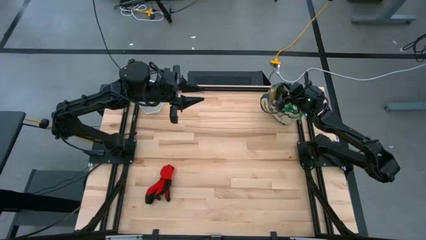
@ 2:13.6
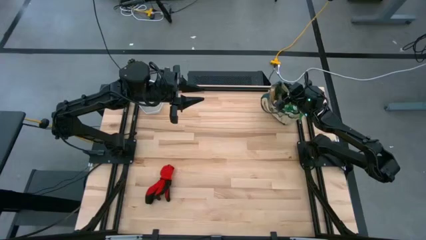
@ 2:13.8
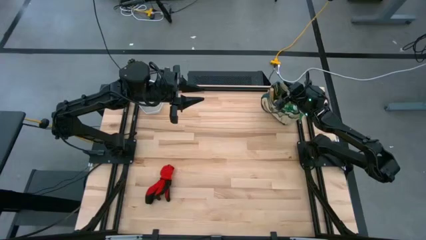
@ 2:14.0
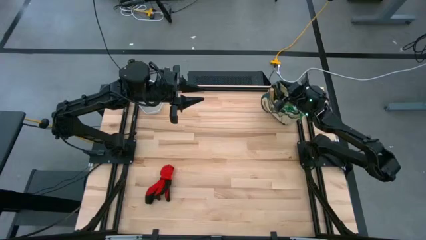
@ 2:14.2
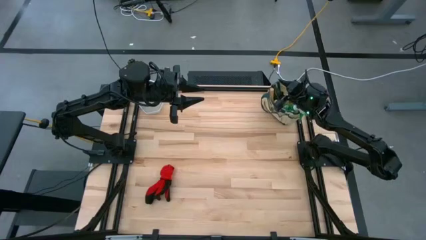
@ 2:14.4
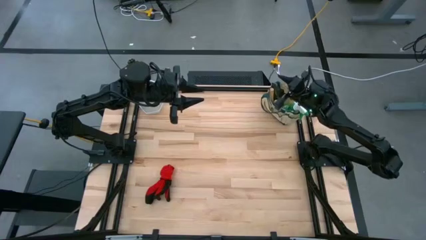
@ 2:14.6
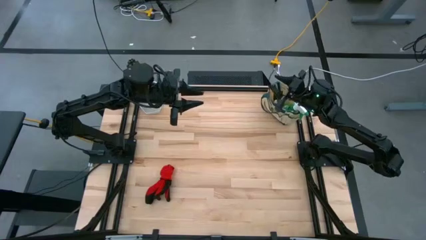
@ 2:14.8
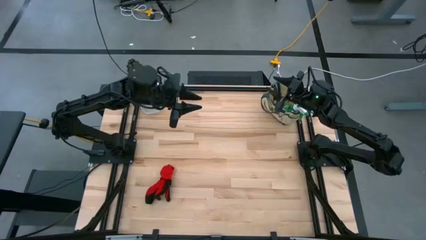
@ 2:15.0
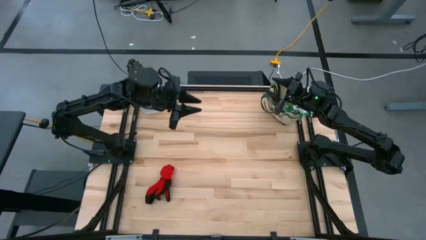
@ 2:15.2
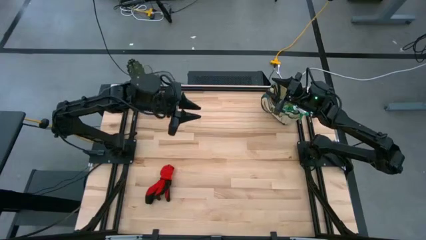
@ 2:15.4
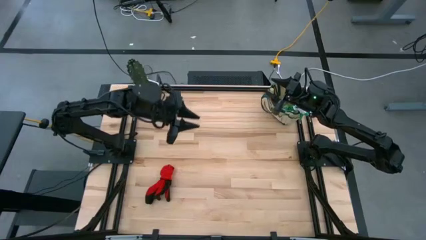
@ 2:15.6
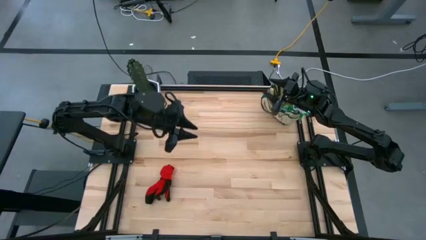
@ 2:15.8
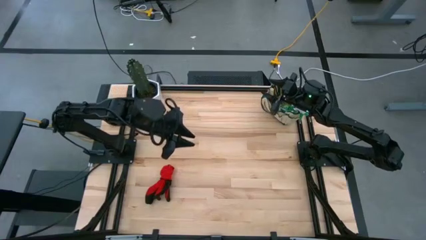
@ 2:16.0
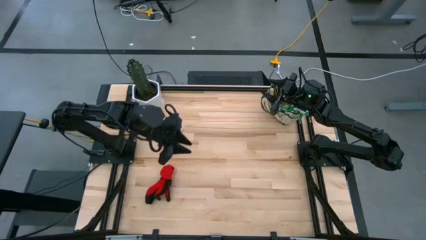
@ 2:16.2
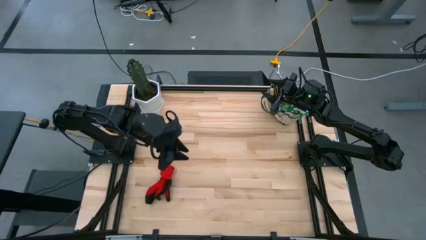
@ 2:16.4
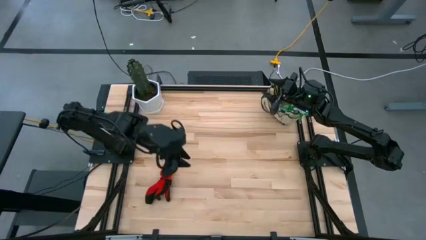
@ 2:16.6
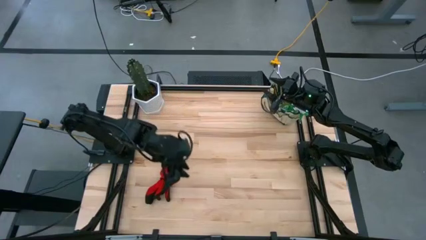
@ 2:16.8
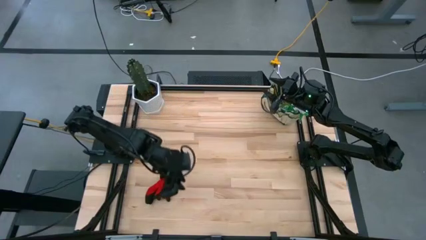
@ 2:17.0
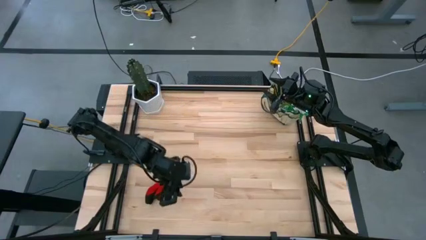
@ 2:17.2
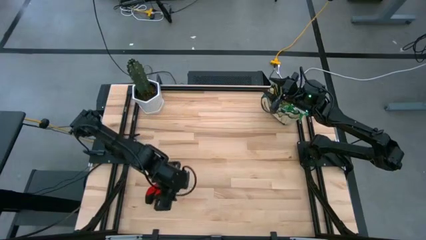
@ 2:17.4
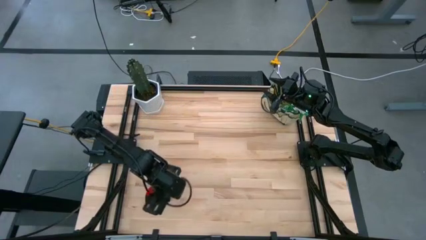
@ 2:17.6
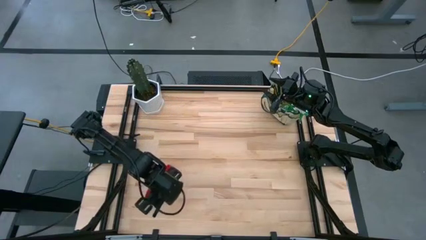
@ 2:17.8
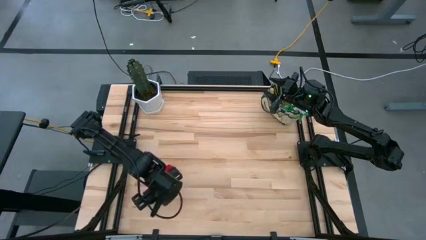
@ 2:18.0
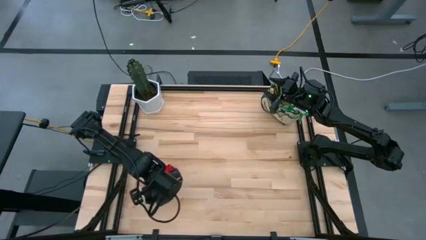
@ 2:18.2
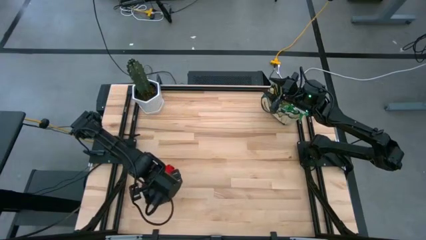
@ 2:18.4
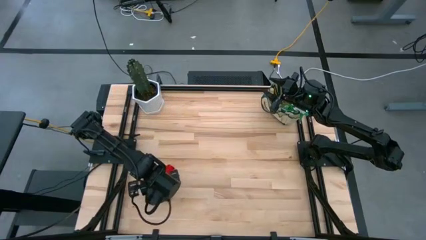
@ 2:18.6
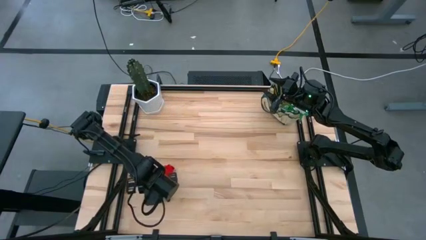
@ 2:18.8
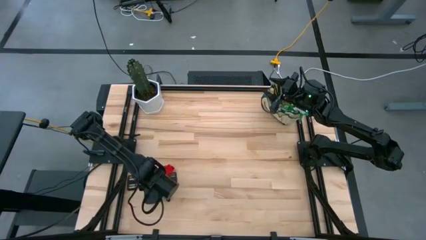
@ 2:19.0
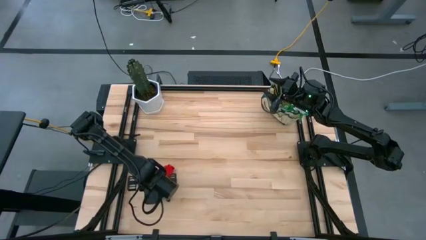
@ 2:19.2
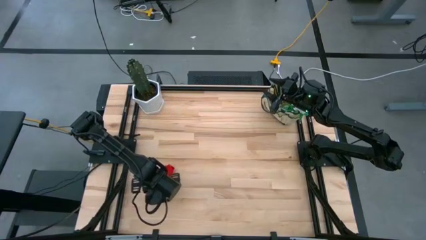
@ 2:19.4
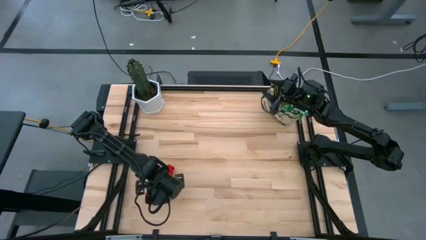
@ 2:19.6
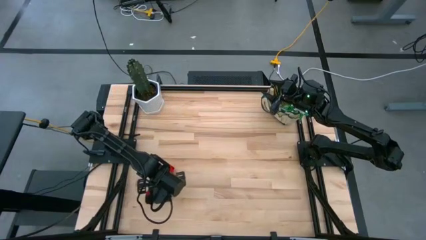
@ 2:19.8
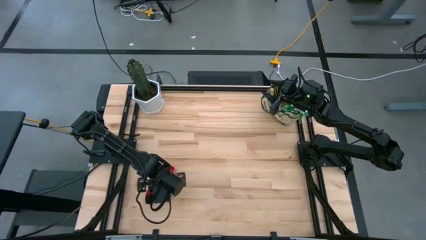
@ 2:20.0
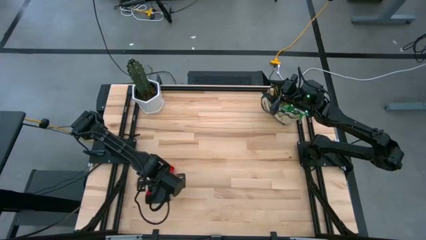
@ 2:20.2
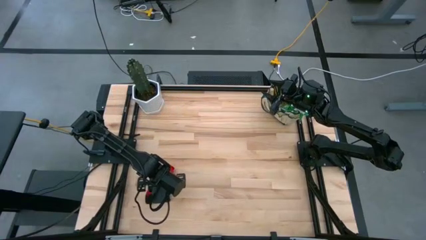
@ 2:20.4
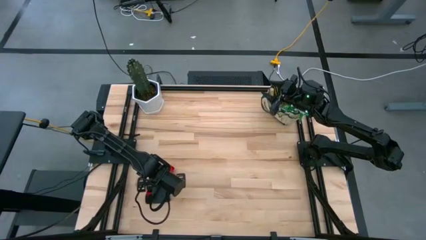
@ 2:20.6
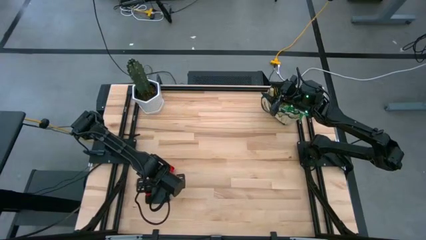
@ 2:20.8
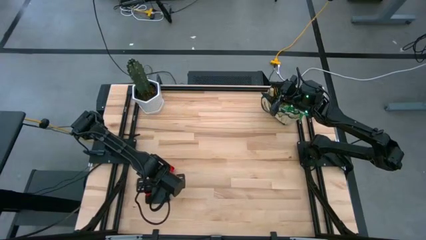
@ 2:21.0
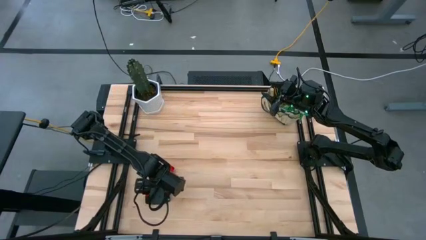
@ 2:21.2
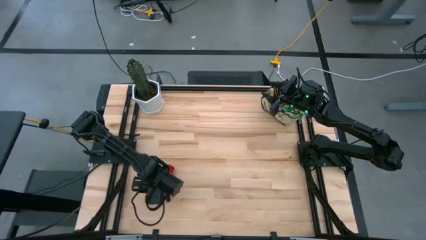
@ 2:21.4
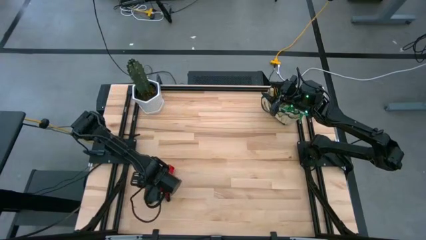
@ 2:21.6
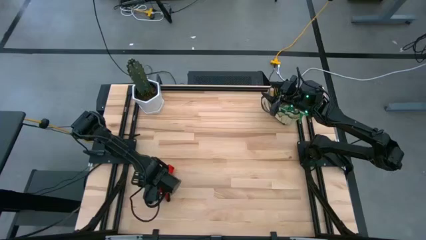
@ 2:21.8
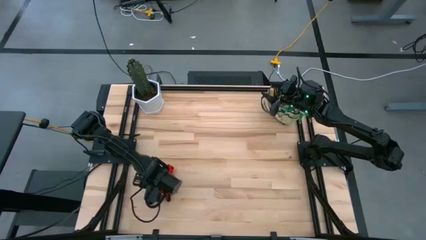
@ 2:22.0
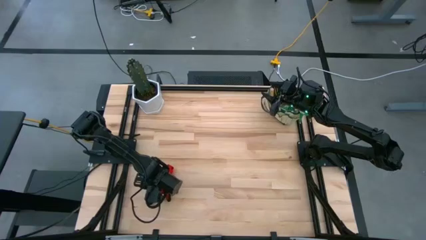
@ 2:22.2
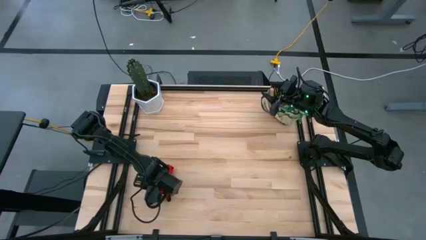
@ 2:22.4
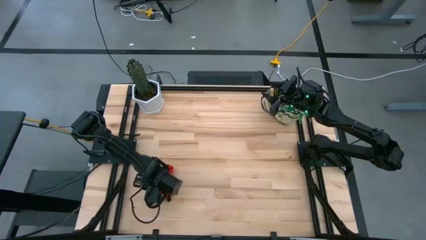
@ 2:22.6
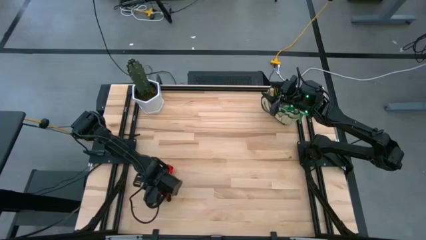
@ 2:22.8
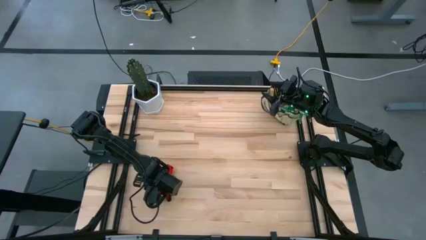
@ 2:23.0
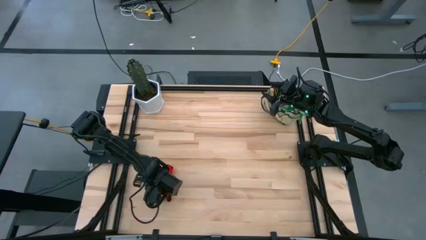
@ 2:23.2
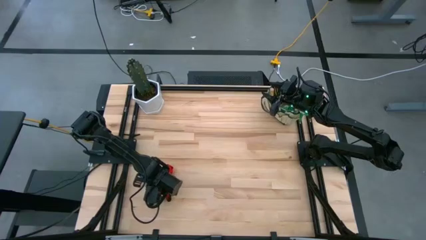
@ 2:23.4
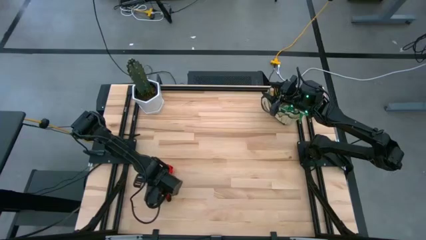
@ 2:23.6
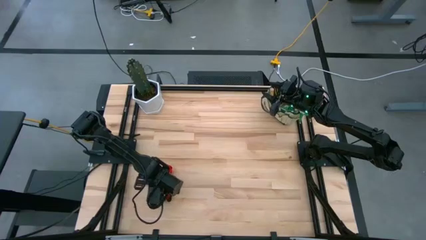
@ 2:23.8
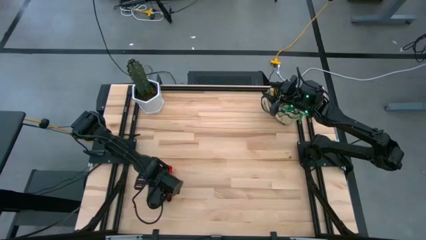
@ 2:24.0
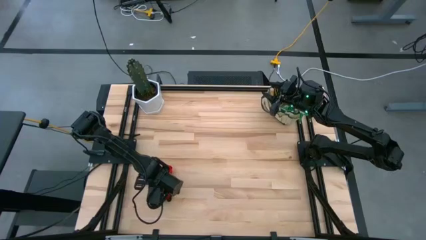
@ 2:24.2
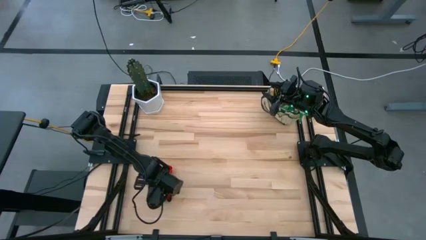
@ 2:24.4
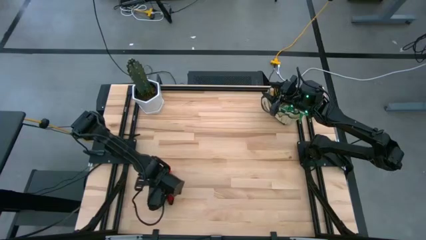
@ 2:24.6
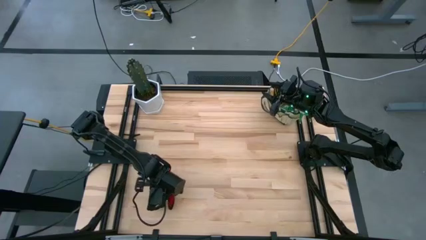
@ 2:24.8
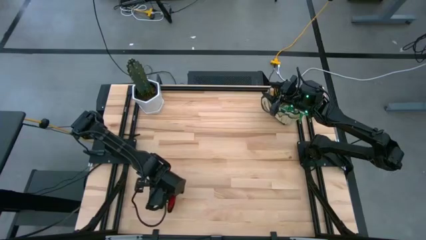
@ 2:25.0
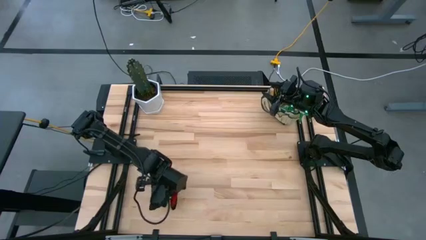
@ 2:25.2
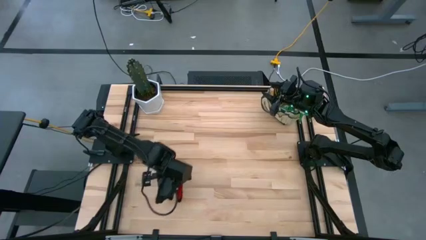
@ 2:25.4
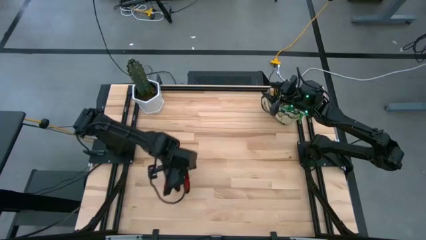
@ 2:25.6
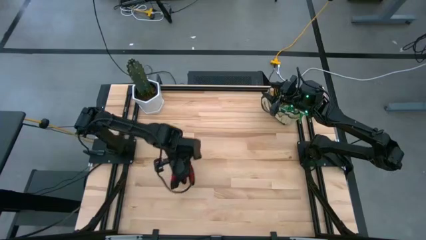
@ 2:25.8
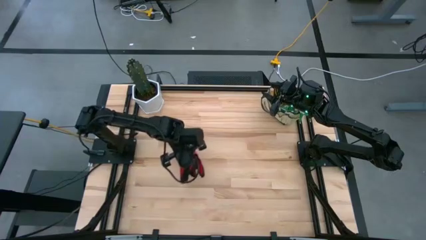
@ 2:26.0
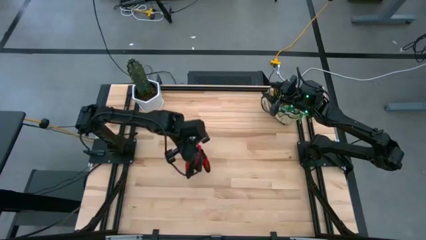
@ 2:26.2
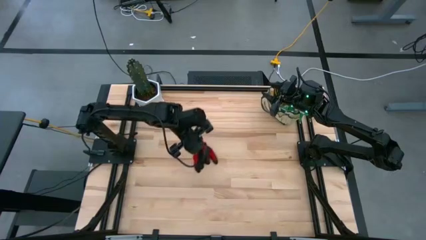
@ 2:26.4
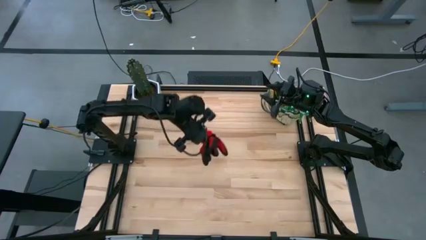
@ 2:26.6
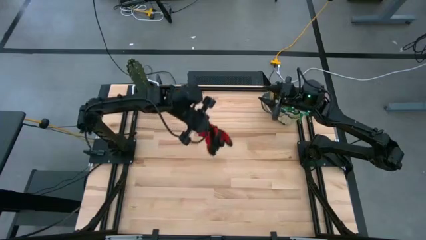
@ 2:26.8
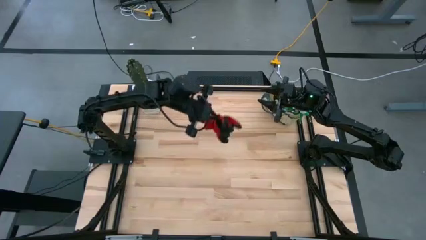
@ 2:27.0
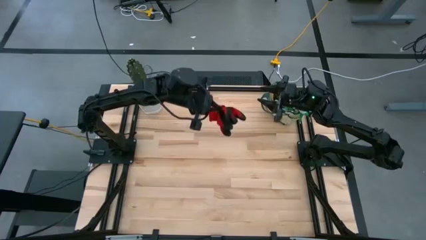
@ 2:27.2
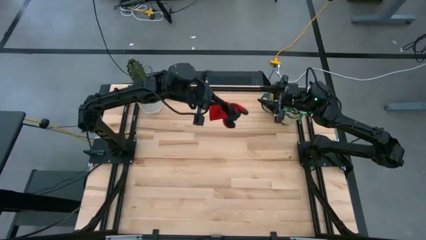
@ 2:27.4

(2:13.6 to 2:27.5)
Task: Pick & Place Garden tools in Gardening bag
Put the red gloves into the white gardening bag

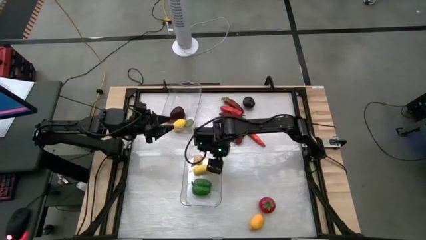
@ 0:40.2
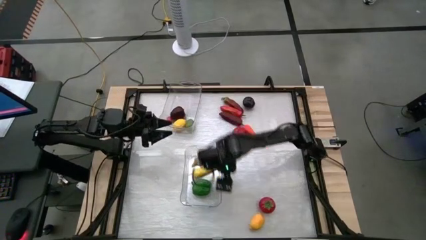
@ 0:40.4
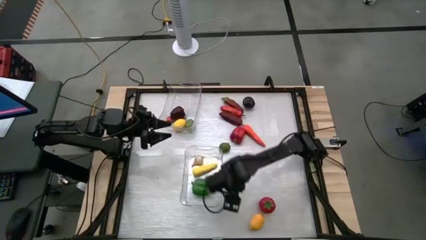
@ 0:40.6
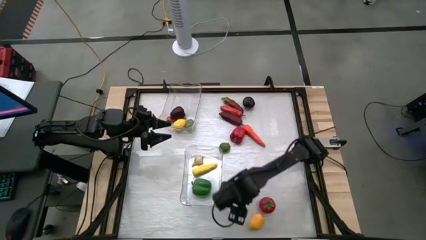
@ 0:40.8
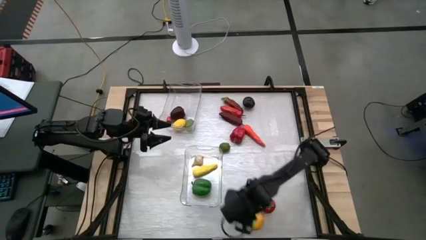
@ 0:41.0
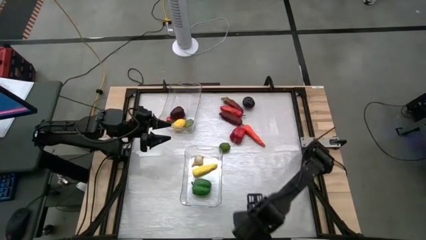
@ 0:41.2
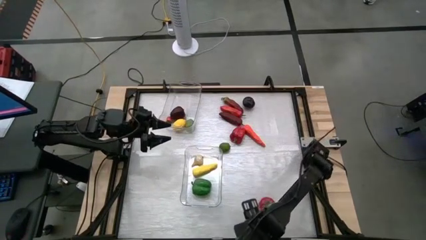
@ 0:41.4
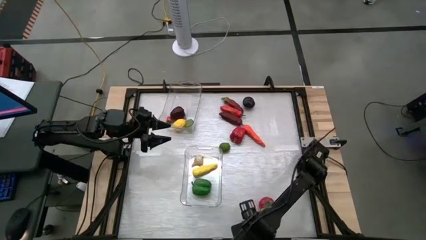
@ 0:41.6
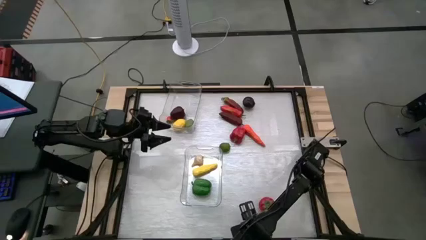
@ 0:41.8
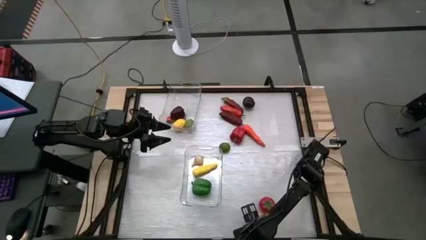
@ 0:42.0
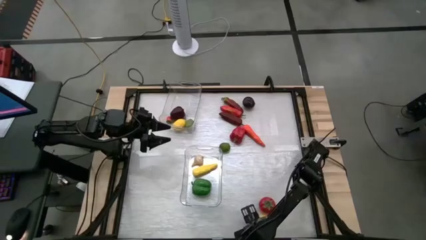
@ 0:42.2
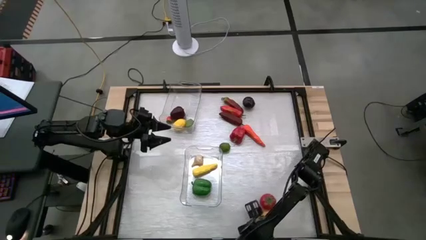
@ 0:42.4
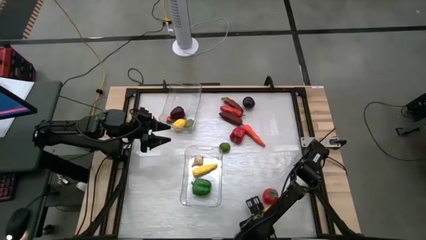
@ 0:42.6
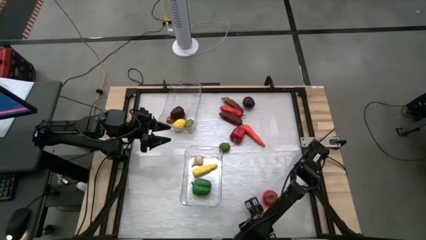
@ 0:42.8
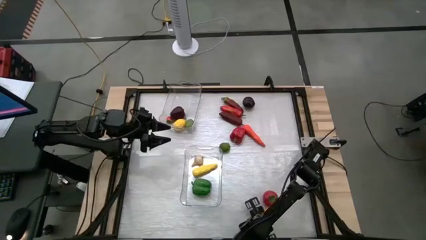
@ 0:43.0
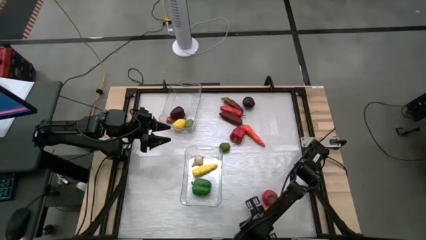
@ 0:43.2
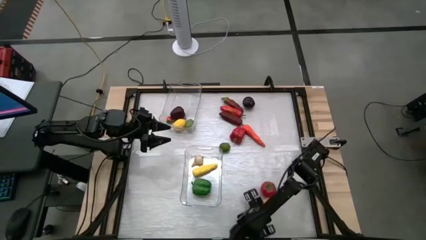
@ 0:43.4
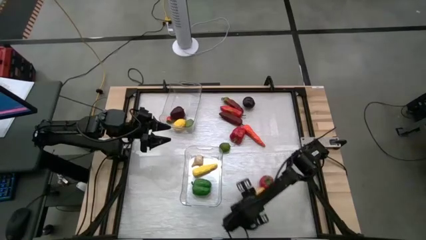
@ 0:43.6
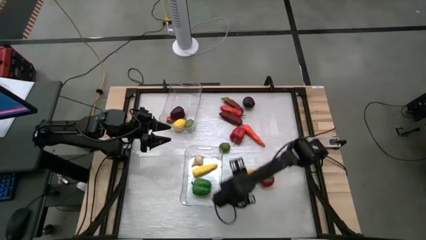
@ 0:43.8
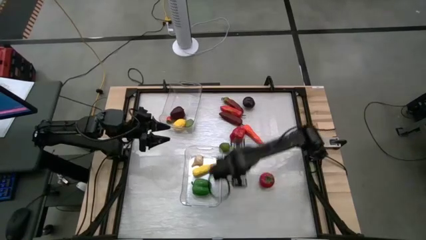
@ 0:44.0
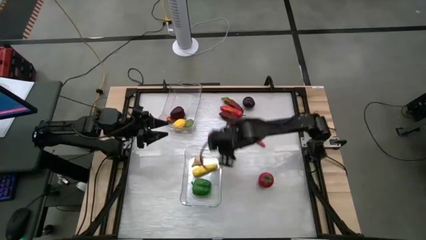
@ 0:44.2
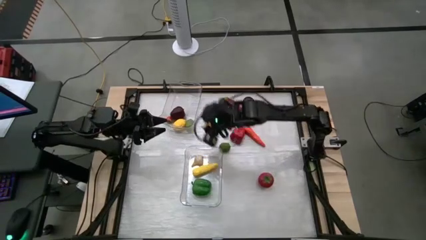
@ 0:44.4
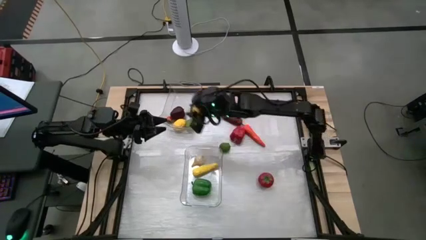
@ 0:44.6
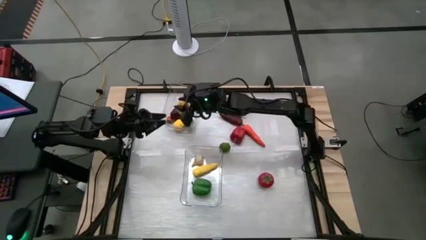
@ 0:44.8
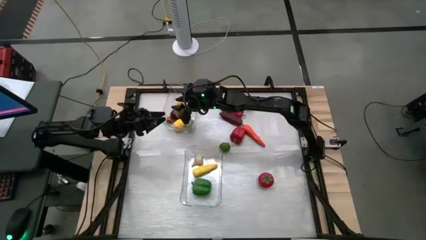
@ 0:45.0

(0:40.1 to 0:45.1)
Task: Sort produce into baskets
Put the yellow lemon into the top transparent bin
